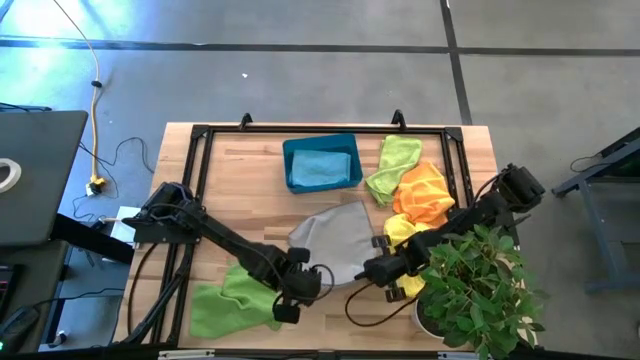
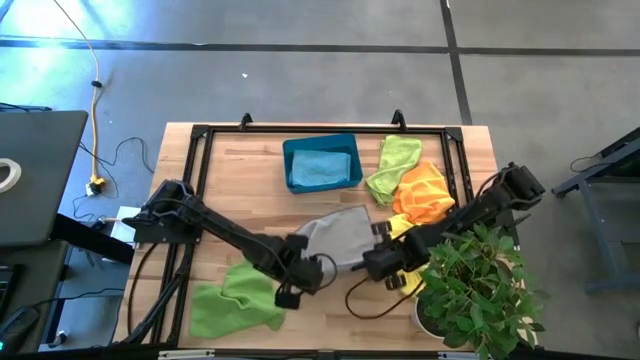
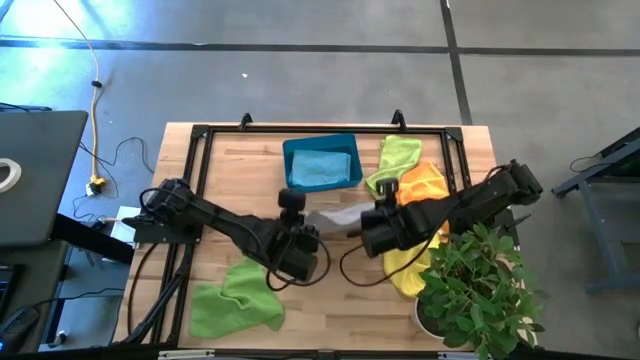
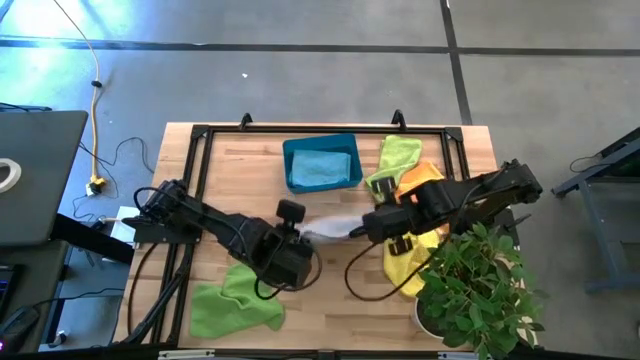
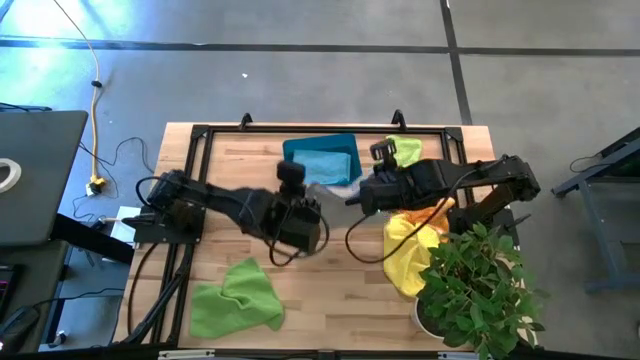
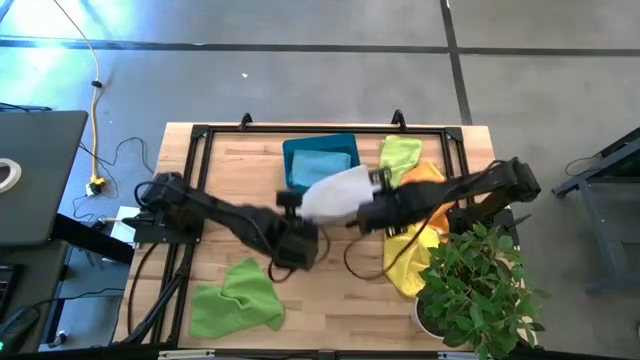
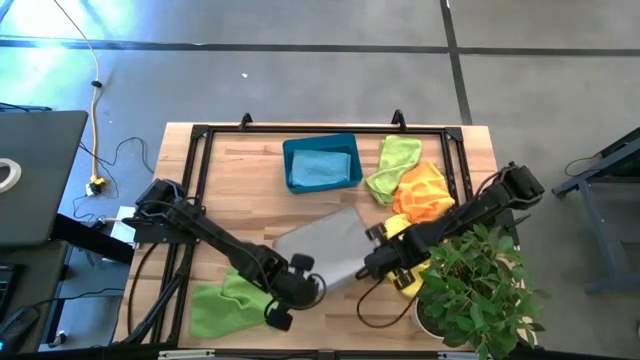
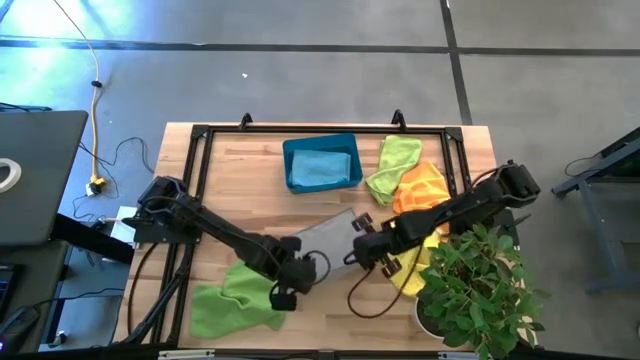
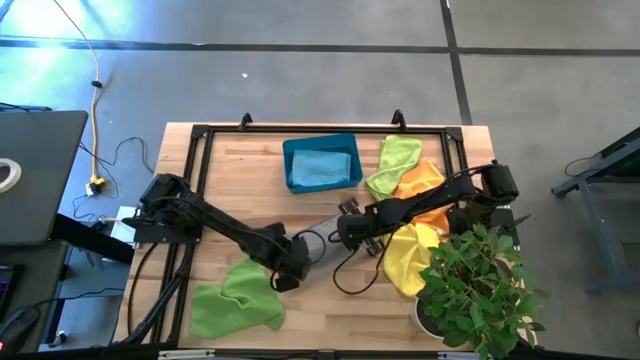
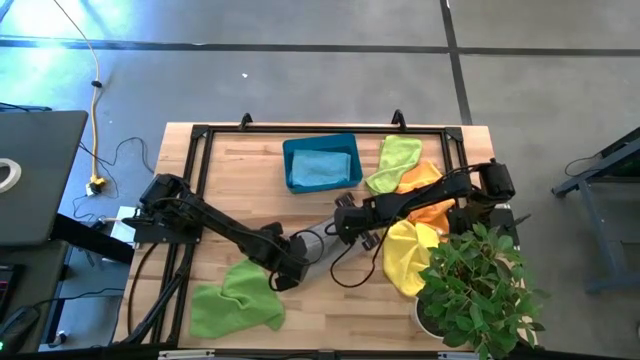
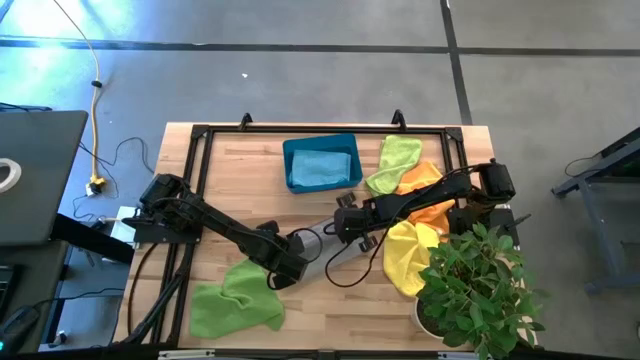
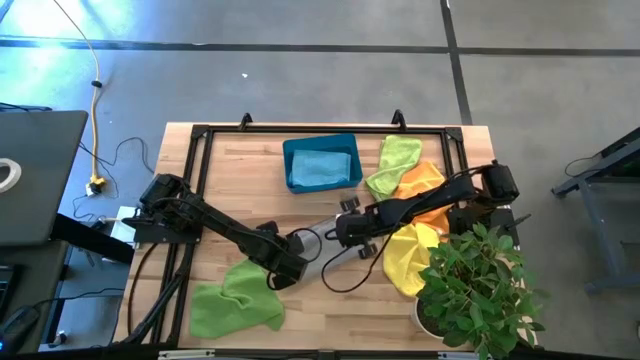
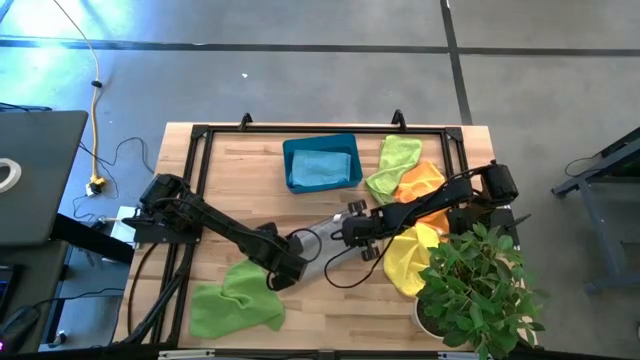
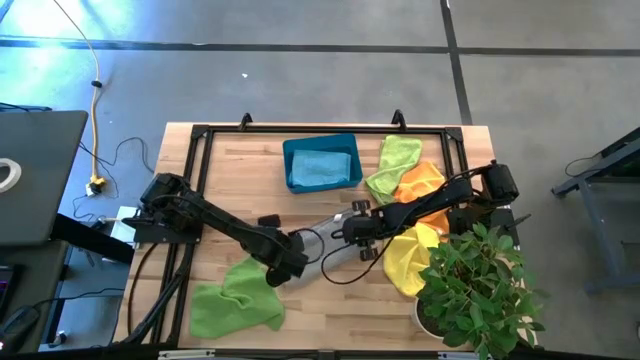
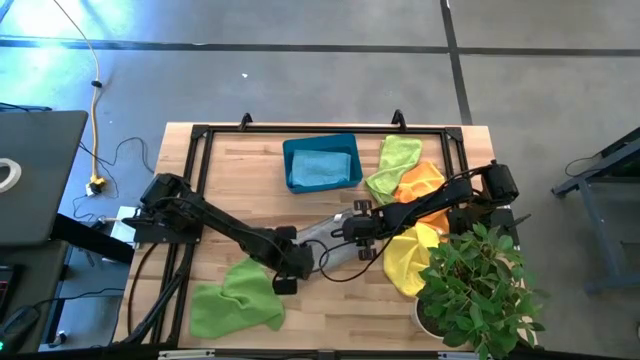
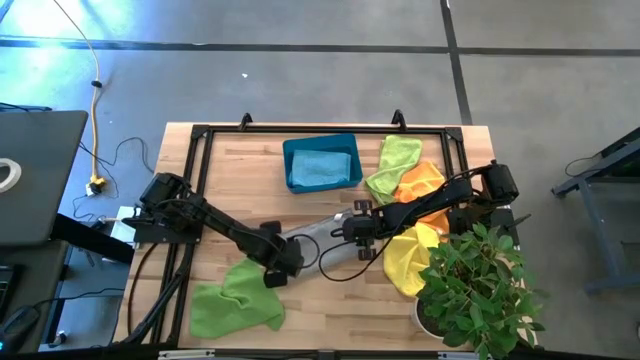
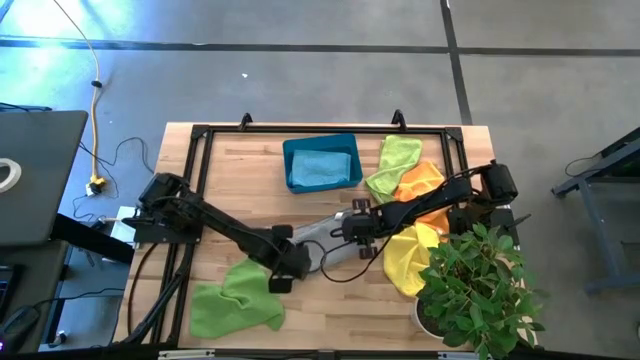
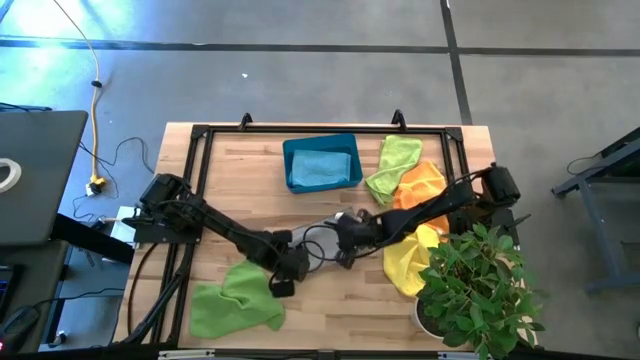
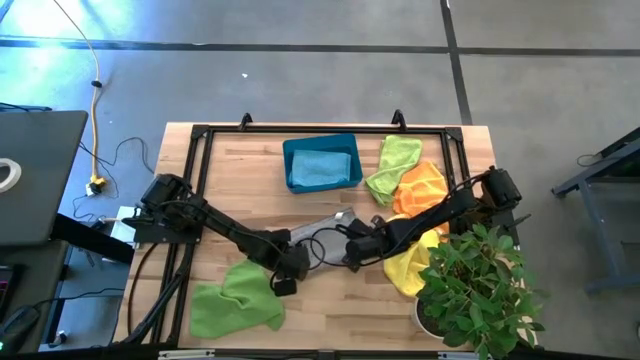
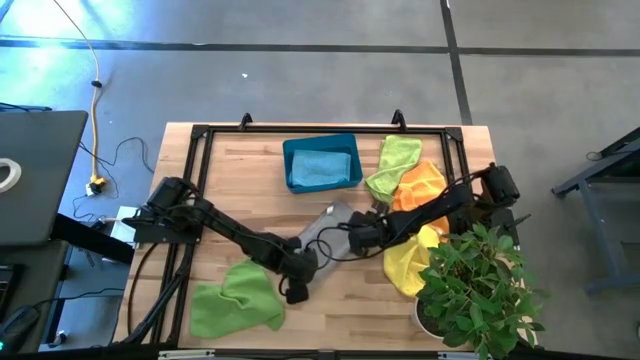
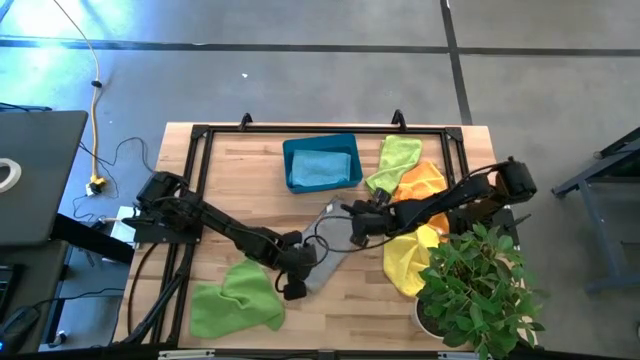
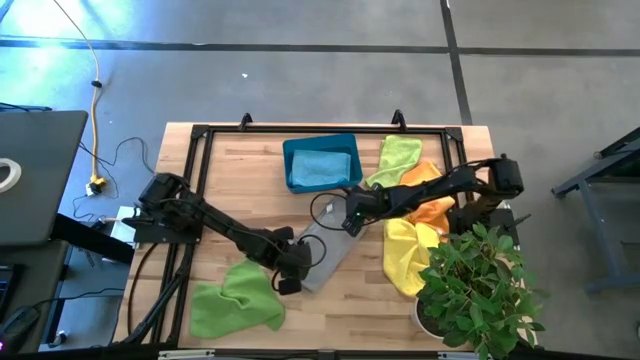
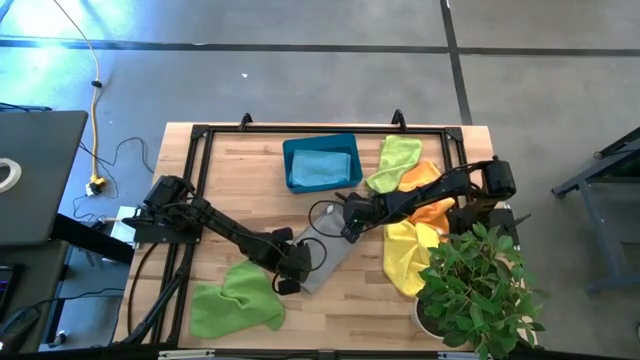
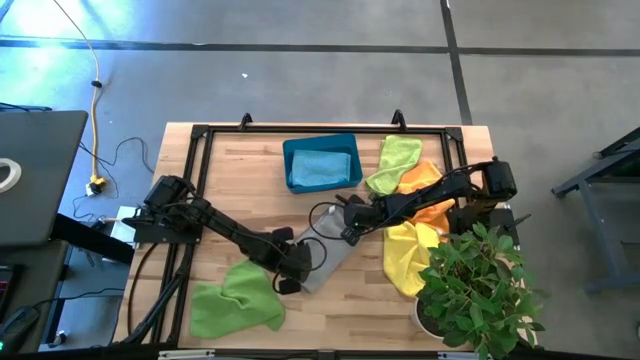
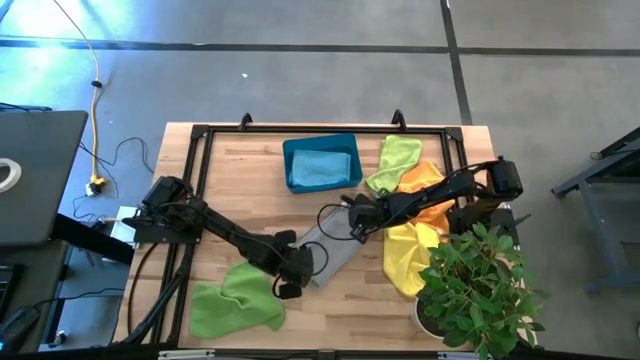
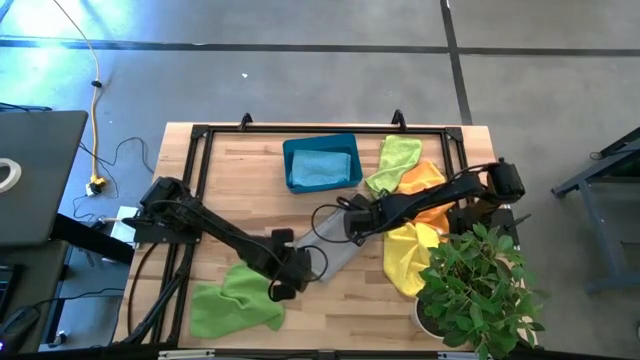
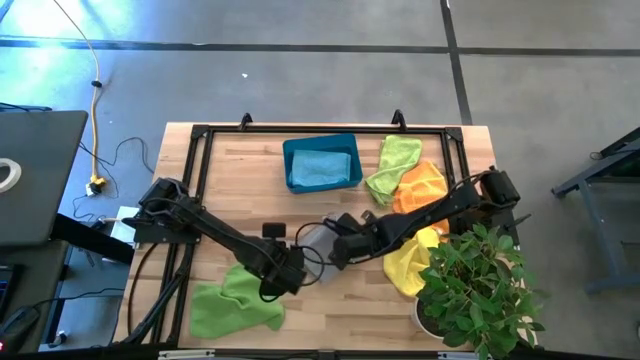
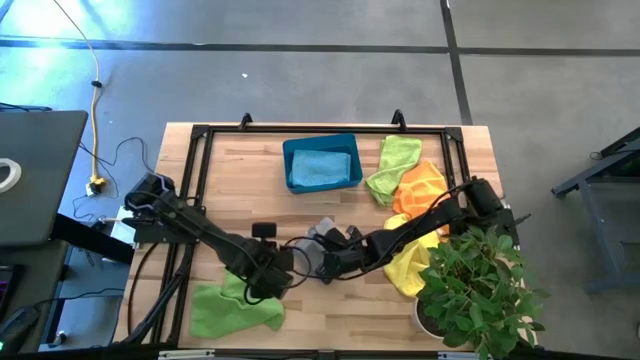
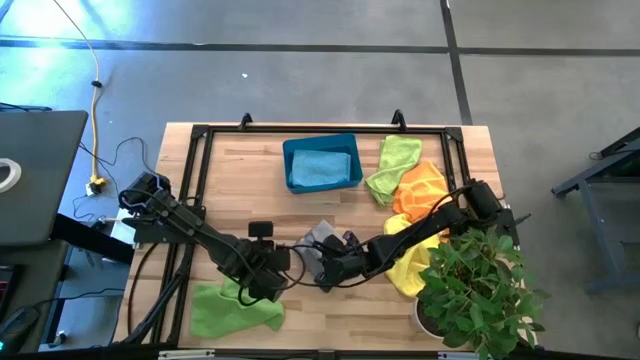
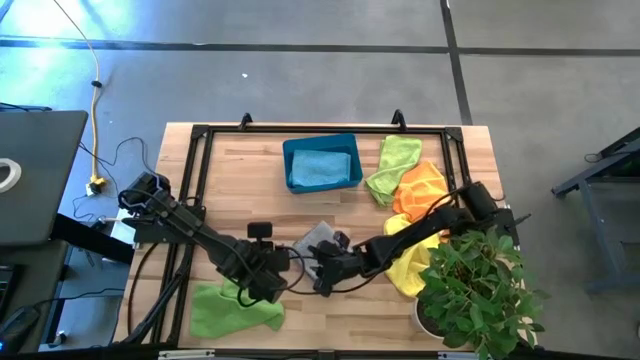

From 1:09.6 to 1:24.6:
Task: Fold microfiber towels
Fold the gray microfiber cloth

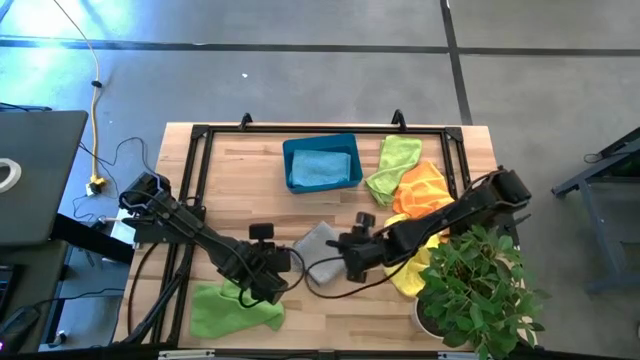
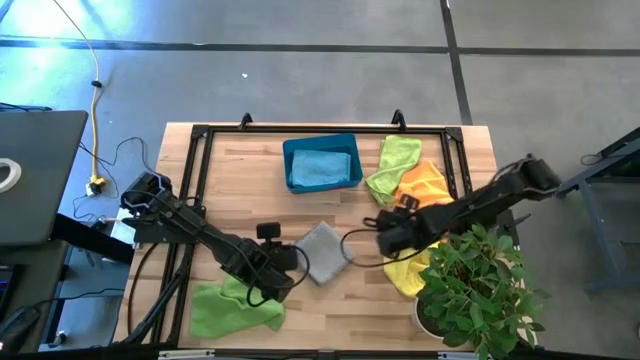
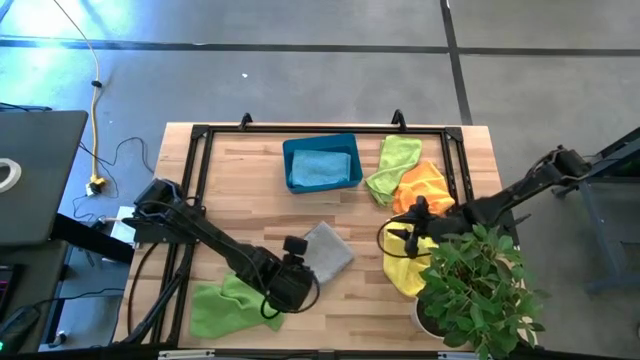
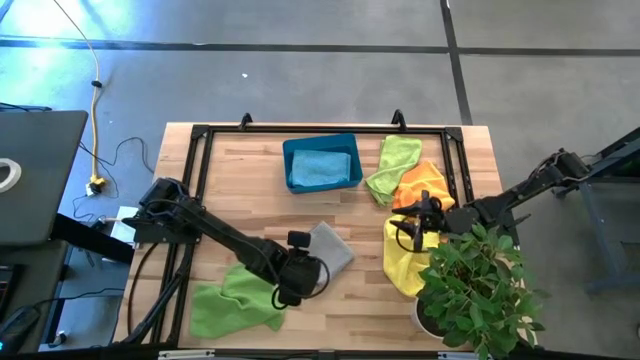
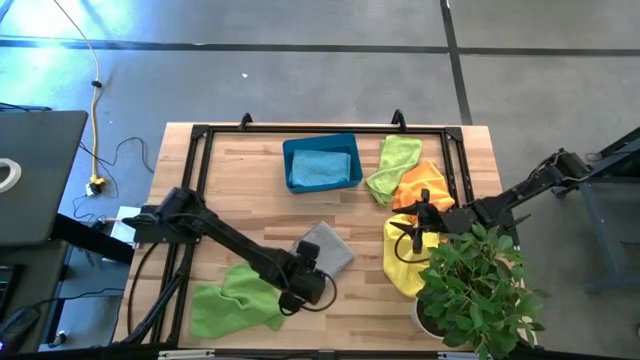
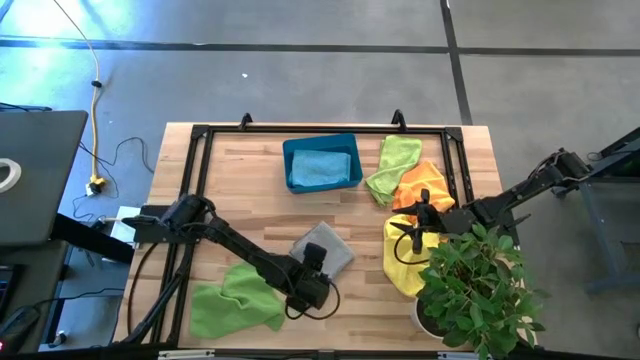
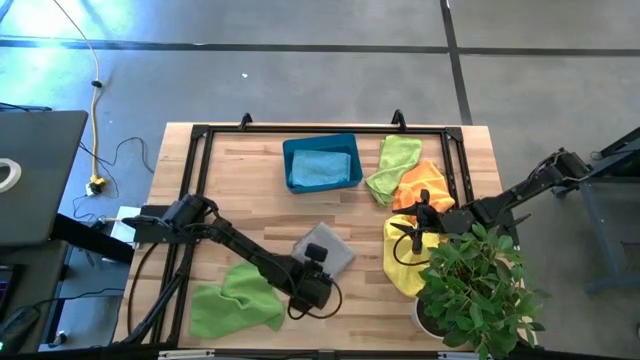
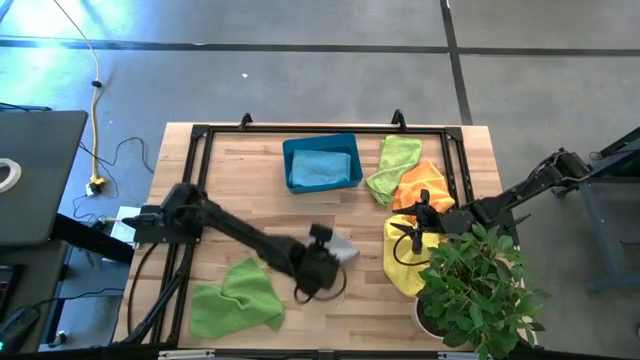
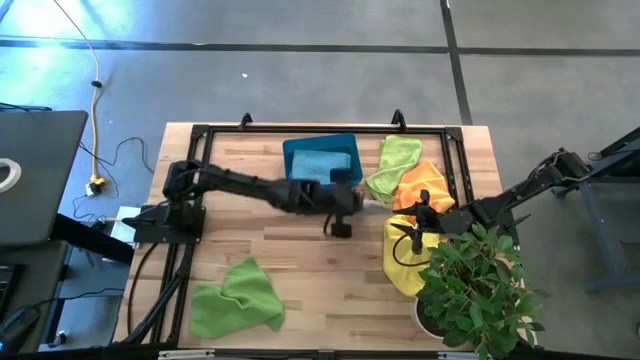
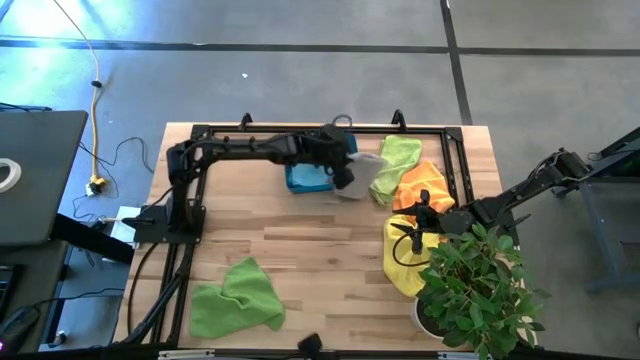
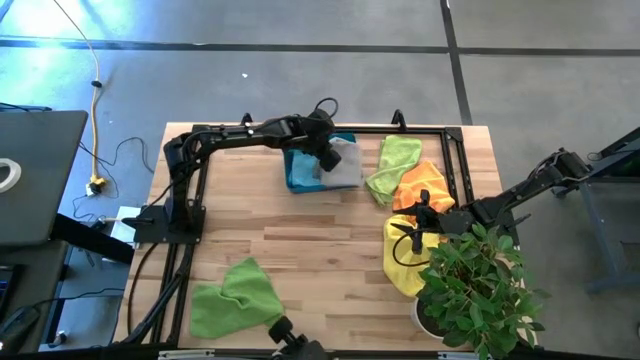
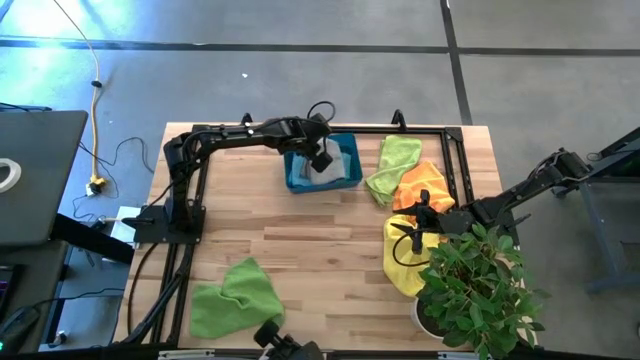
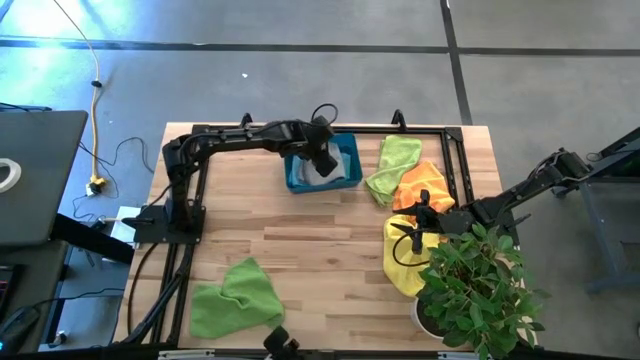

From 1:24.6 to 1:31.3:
Stack the gray microfiber cloth on the blue microfiber cloth in the blue bin
